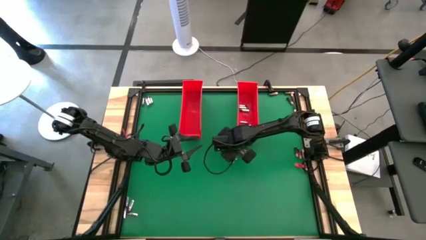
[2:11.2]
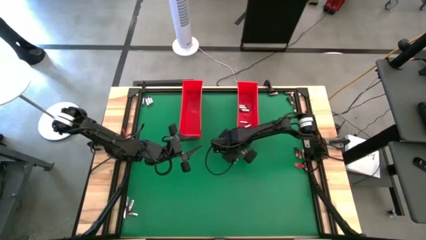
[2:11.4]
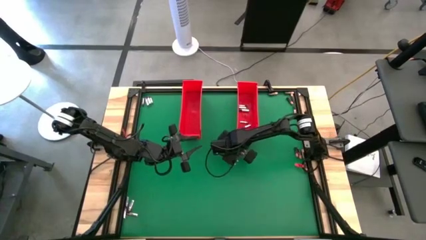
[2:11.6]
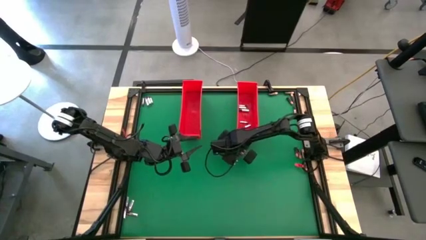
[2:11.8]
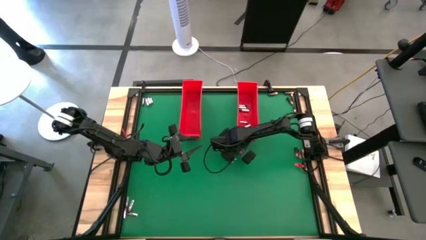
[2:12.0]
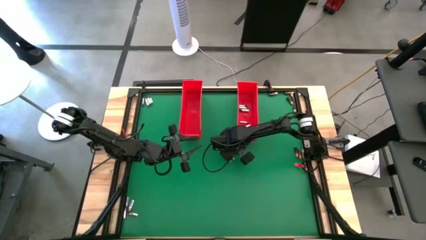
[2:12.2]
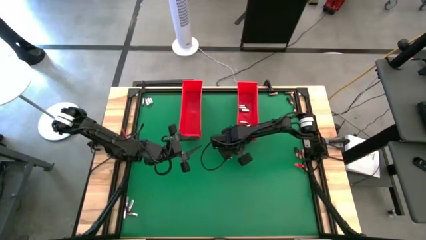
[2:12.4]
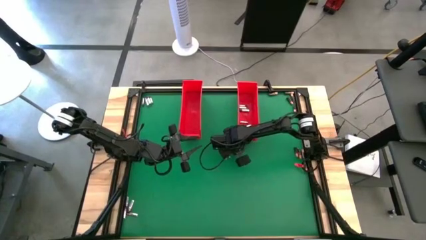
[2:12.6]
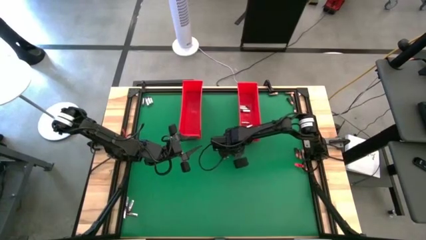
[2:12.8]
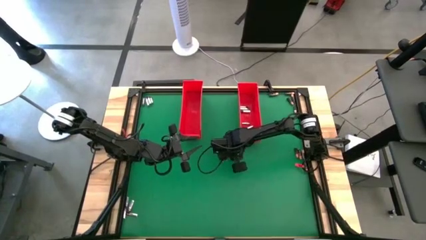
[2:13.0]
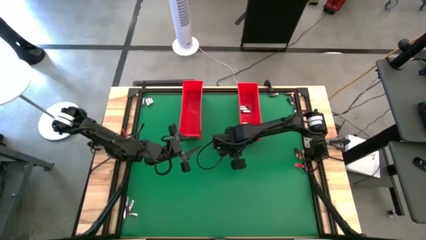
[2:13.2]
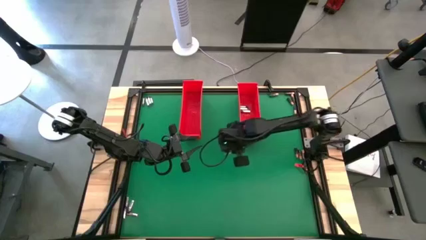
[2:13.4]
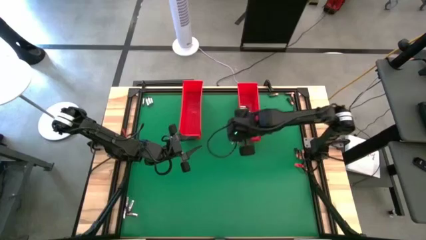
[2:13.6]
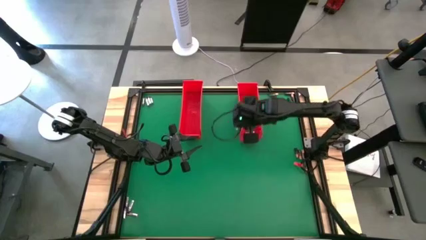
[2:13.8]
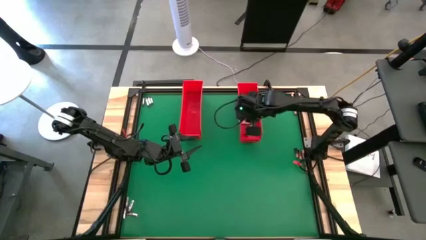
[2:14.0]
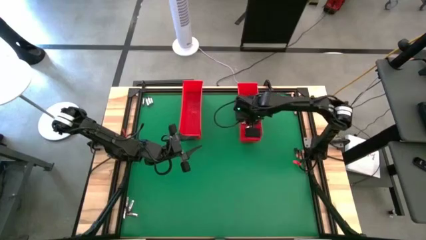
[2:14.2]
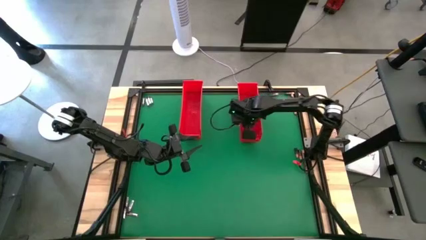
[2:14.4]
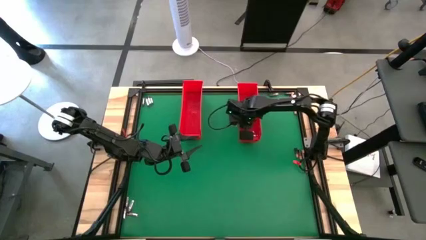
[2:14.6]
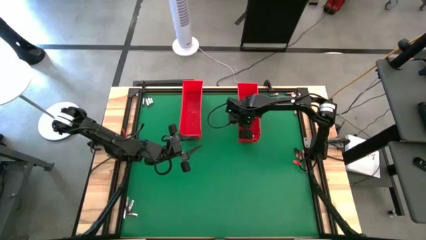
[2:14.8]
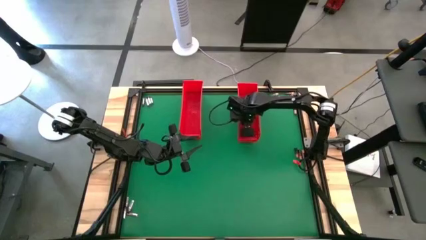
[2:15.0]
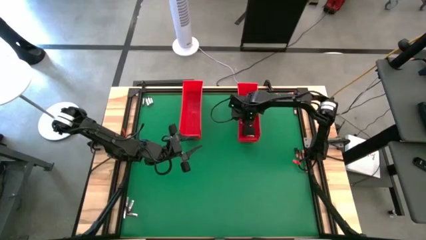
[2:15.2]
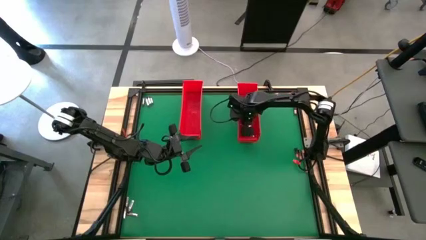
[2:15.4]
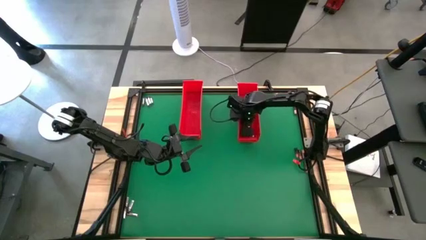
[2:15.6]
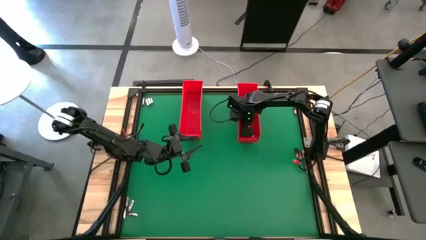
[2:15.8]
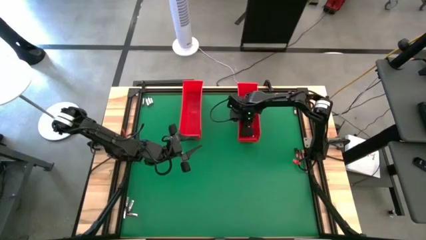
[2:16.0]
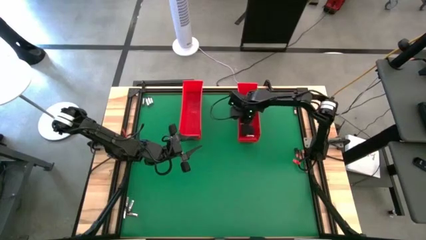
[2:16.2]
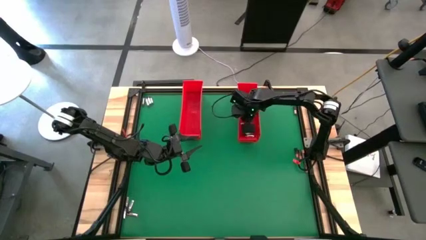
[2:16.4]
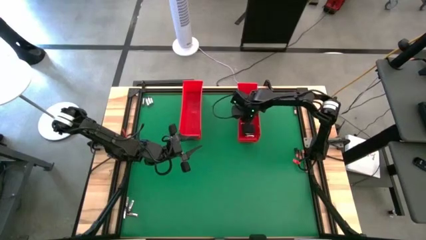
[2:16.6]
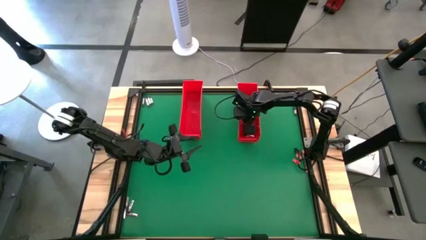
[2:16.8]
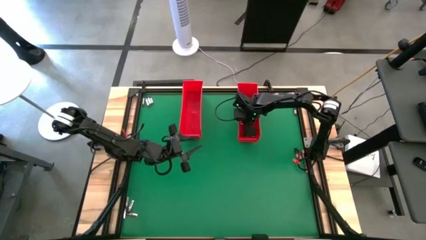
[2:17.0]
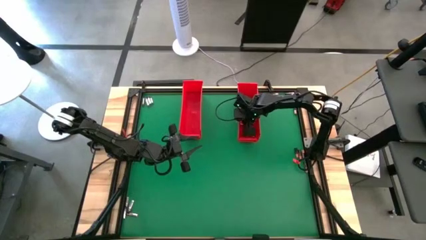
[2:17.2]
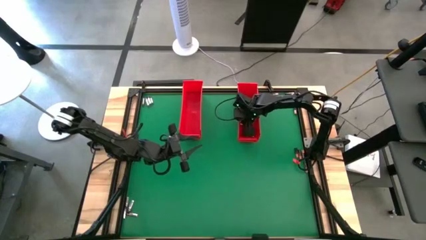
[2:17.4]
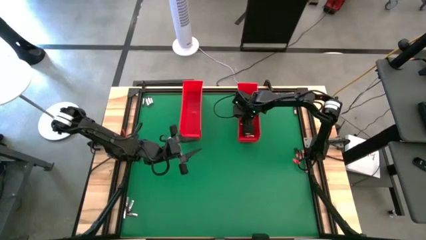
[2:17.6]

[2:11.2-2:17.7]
Task: Sort batteries
Put the silver battery into the right red bin

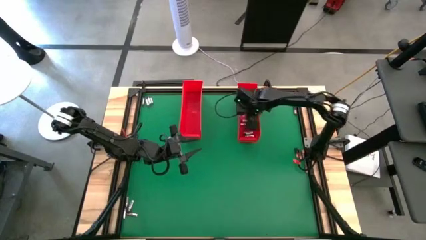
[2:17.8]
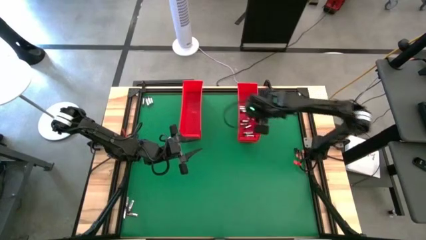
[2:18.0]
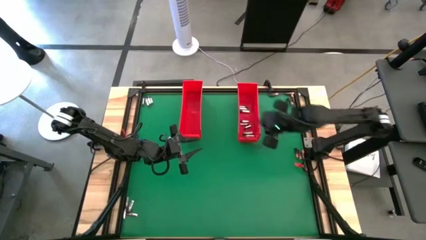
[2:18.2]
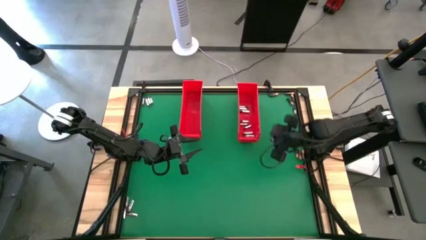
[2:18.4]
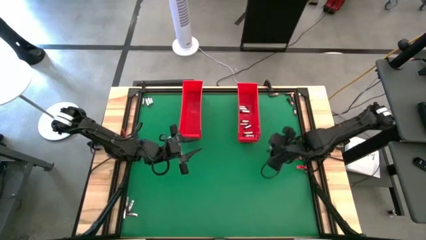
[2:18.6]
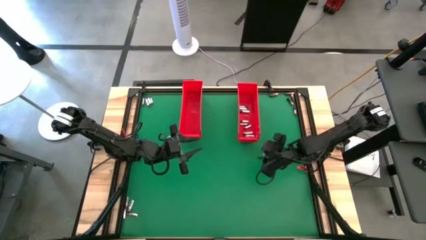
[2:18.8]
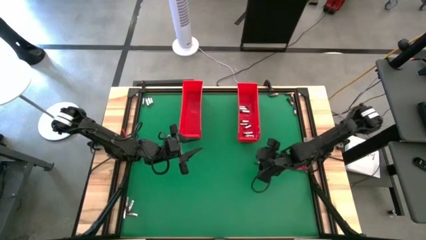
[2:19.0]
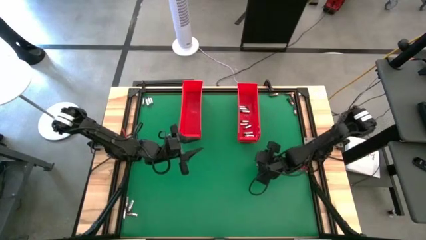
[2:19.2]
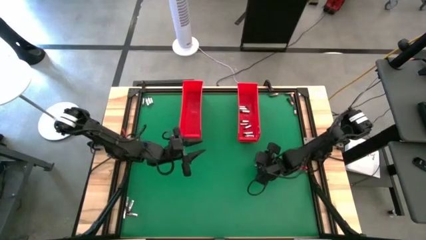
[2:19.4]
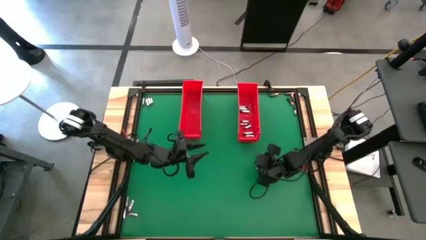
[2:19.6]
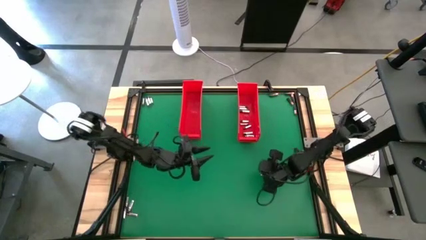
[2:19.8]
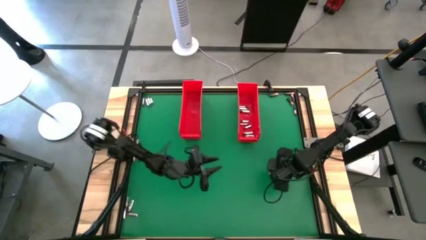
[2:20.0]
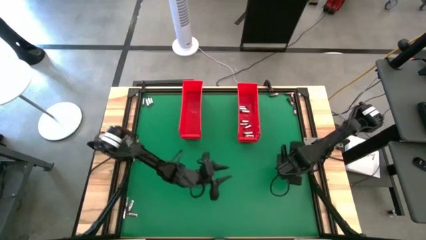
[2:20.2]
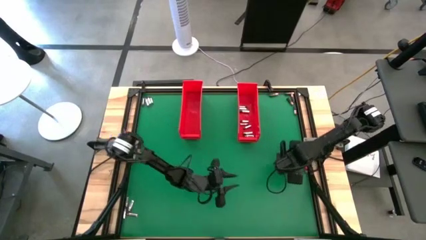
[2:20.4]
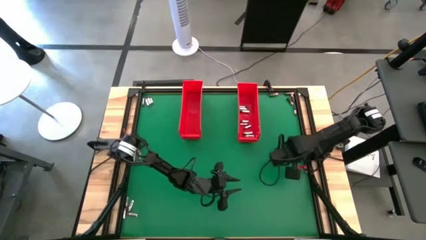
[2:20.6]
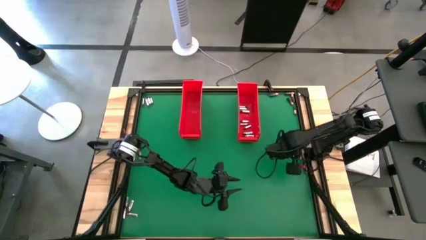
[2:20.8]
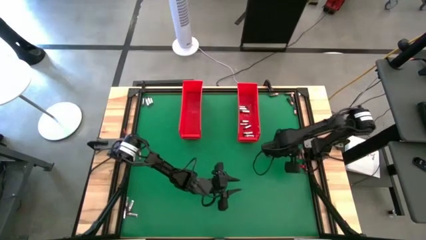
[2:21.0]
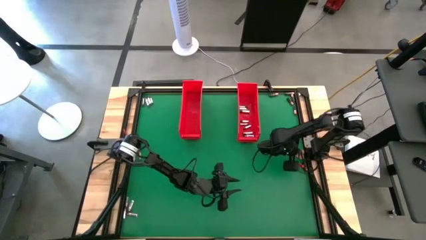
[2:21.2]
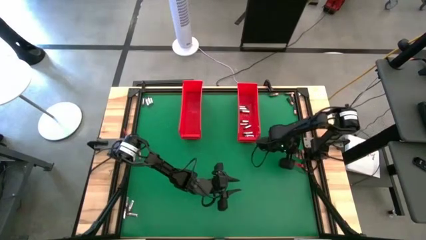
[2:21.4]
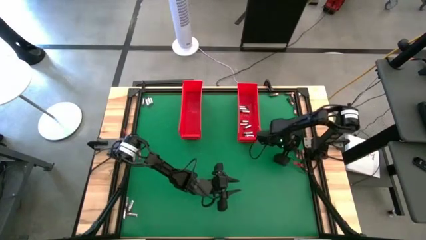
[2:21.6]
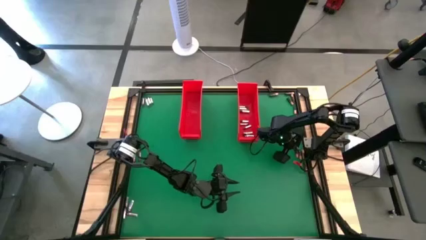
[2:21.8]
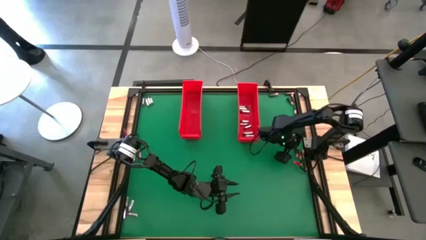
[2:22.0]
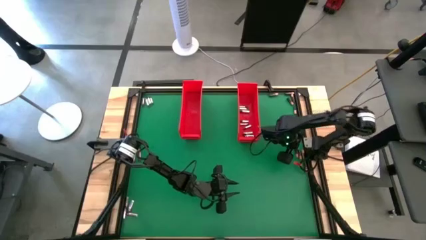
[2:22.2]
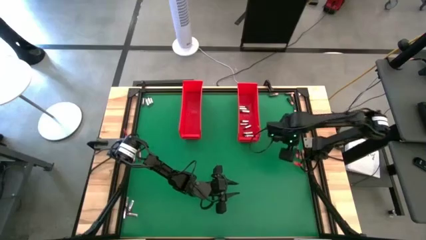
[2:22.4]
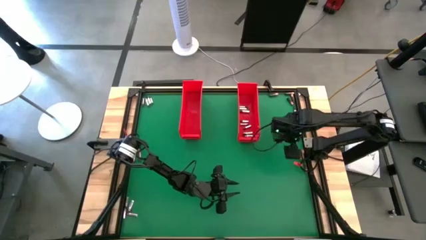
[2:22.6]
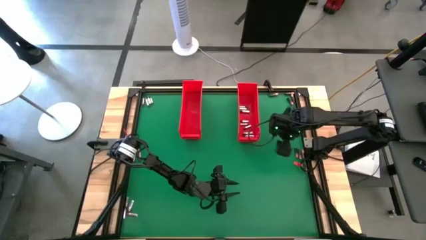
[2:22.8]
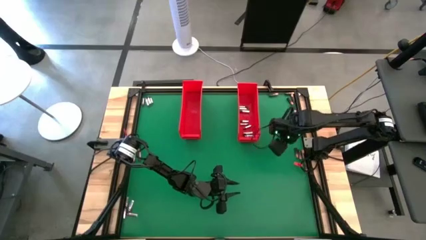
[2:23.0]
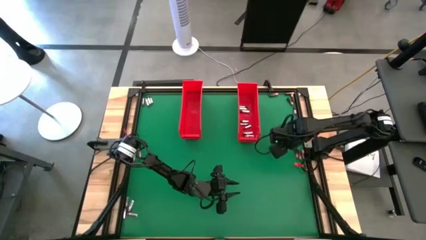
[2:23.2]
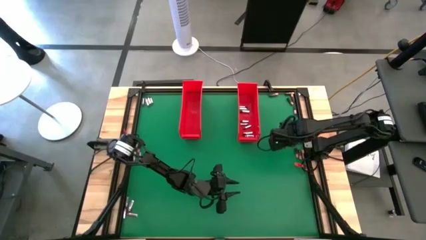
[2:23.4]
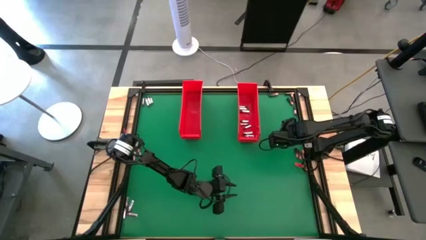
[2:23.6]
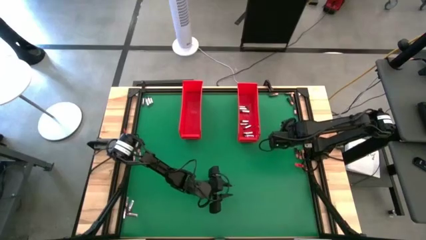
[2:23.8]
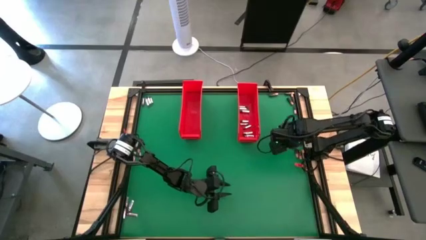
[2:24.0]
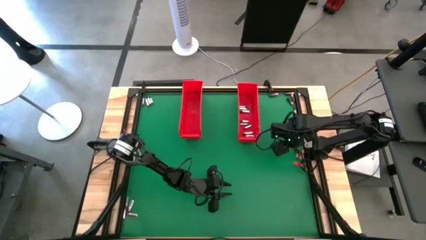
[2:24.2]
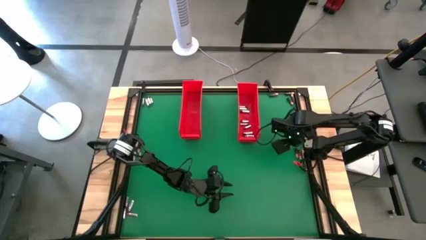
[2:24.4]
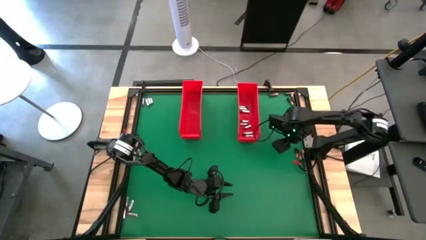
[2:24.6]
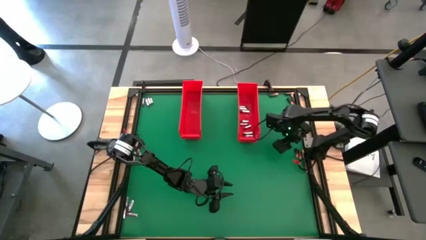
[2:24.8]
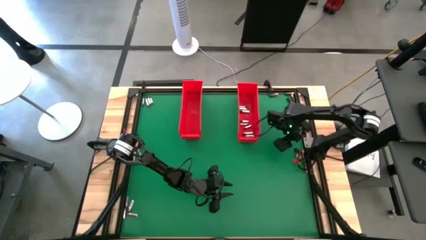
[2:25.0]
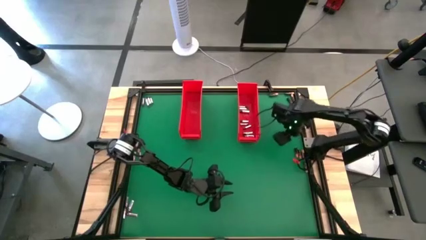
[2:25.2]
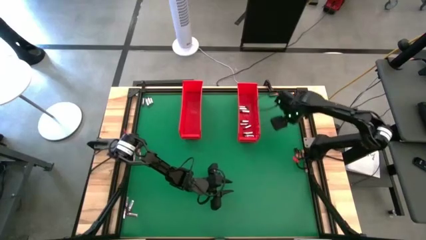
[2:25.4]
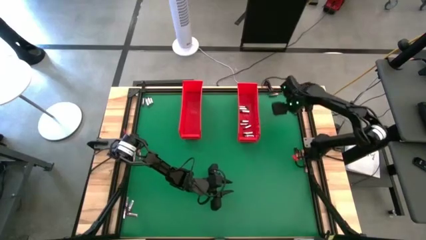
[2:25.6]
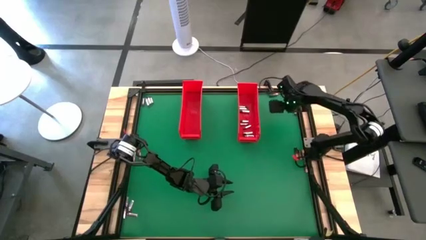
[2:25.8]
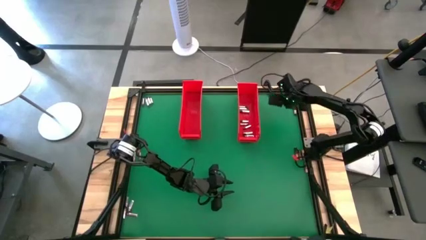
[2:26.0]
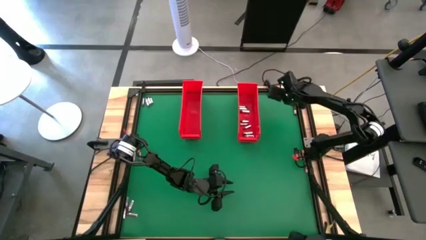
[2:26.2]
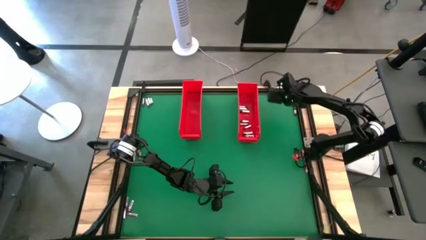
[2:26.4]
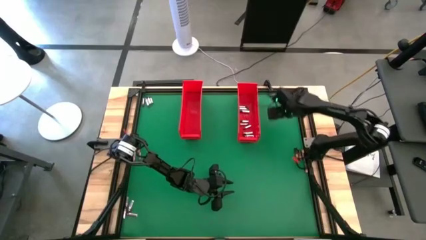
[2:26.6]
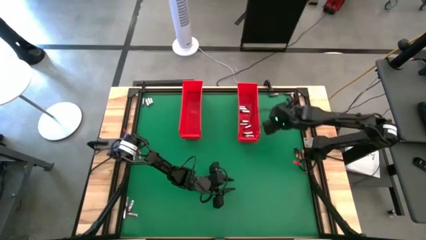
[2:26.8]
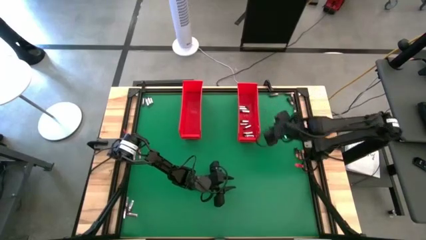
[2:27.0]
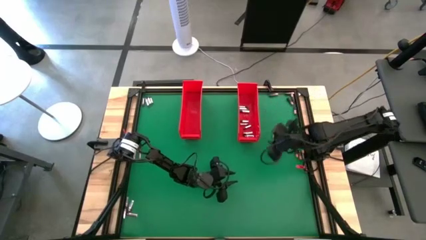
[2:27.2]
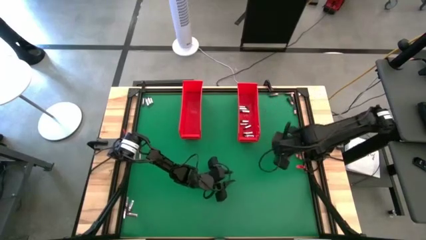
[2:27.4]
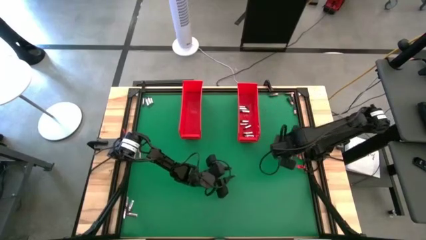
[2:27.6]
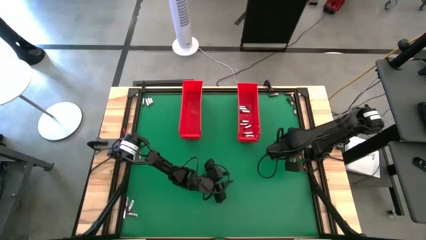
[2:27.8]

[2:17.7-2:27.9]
Put the brown battery into the left red bin
